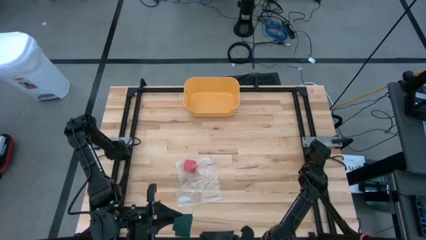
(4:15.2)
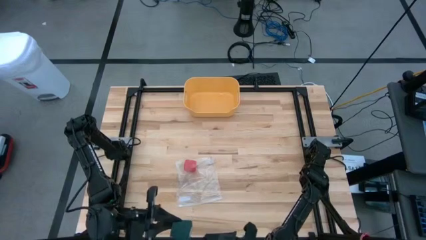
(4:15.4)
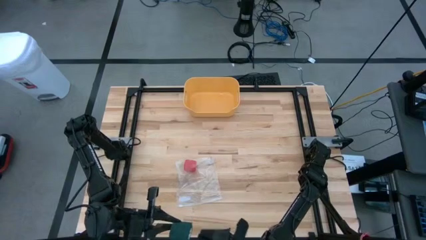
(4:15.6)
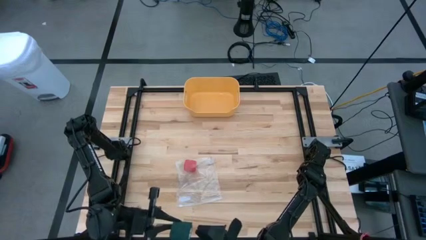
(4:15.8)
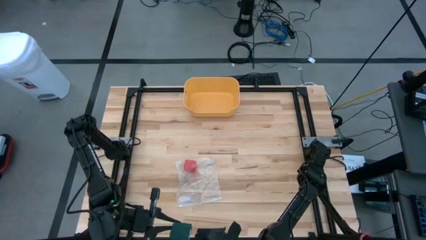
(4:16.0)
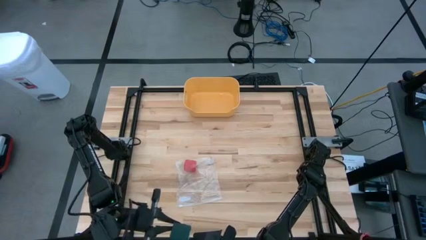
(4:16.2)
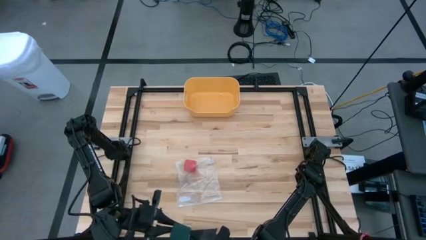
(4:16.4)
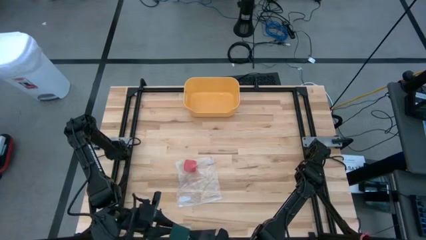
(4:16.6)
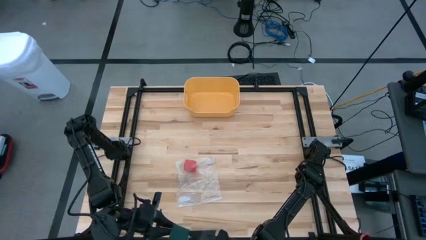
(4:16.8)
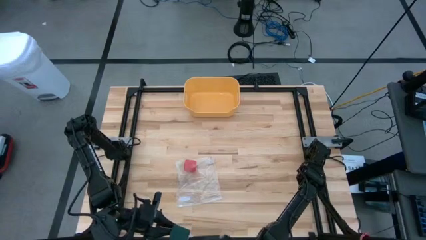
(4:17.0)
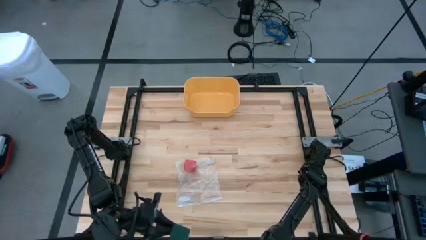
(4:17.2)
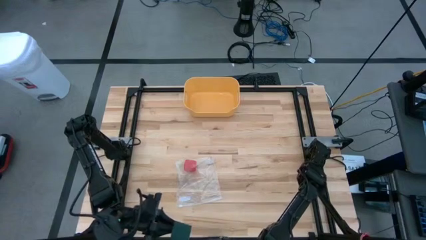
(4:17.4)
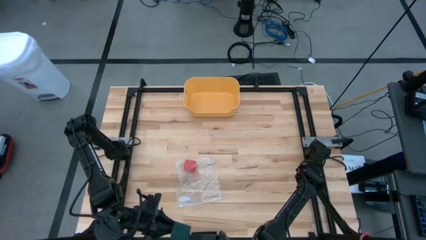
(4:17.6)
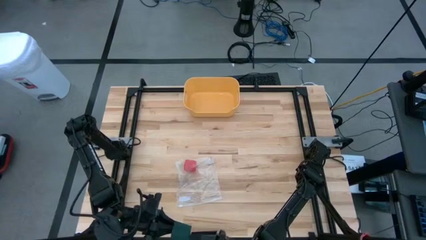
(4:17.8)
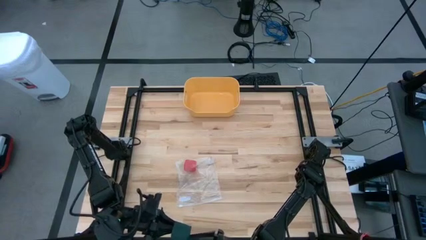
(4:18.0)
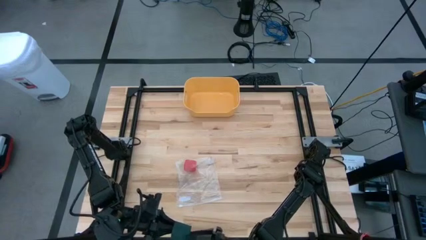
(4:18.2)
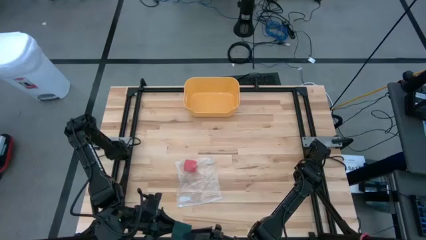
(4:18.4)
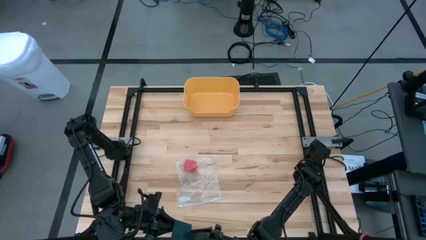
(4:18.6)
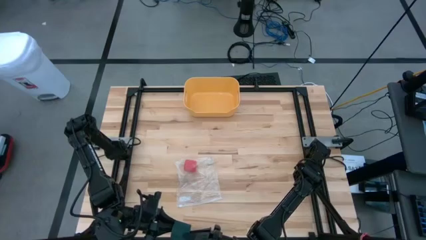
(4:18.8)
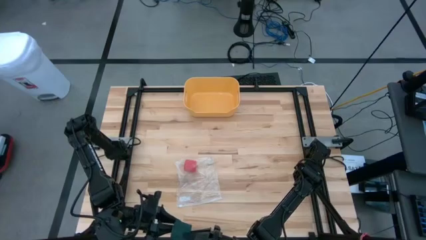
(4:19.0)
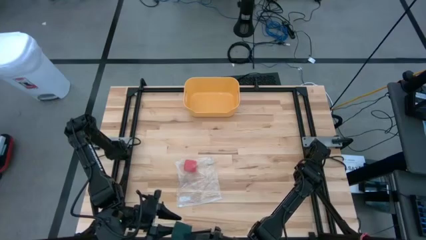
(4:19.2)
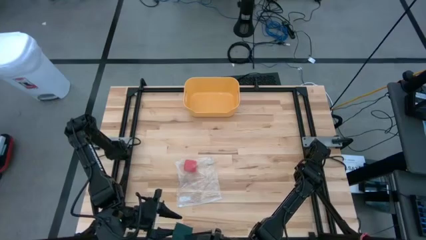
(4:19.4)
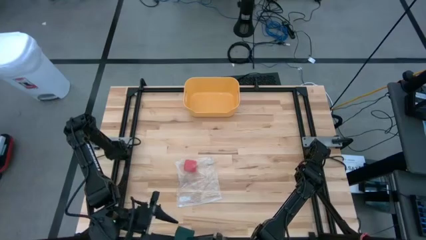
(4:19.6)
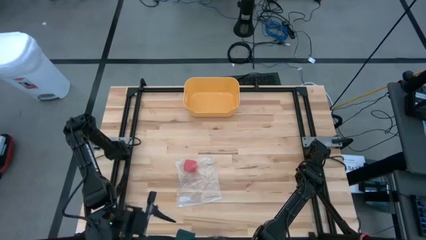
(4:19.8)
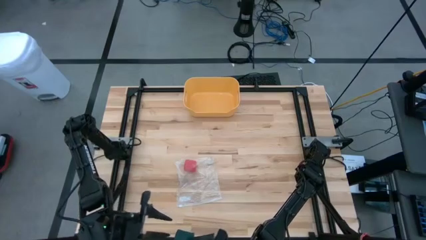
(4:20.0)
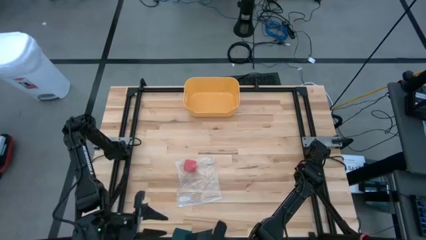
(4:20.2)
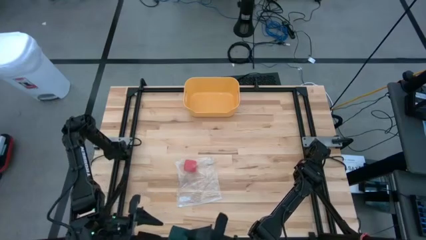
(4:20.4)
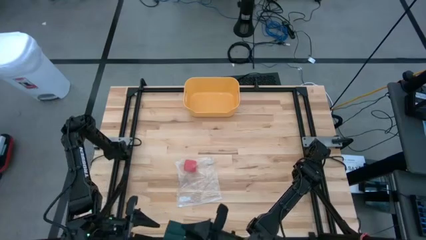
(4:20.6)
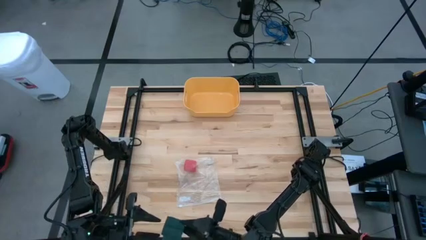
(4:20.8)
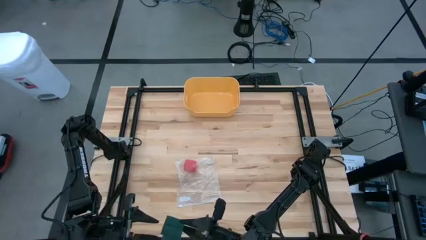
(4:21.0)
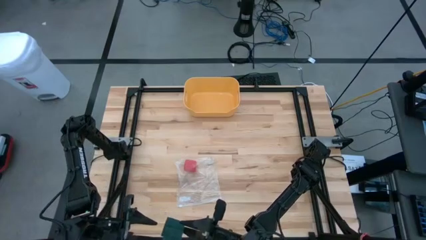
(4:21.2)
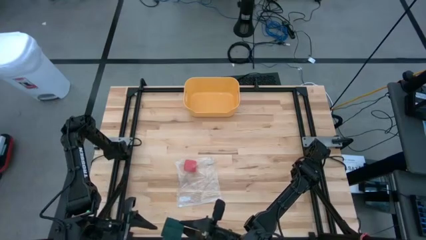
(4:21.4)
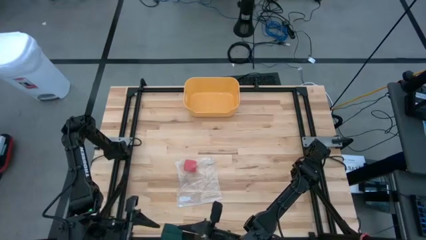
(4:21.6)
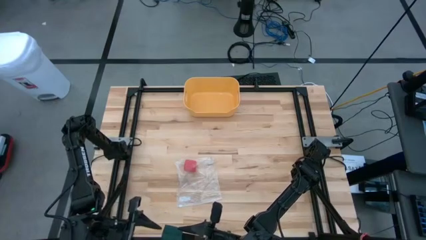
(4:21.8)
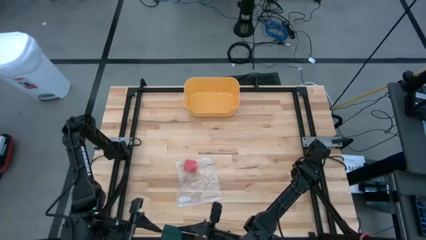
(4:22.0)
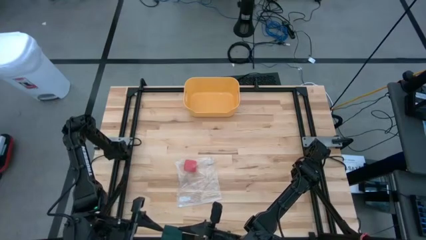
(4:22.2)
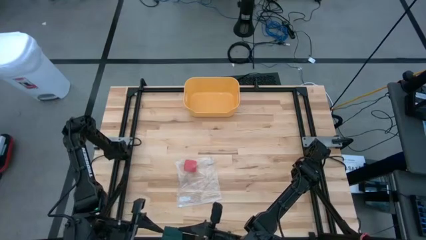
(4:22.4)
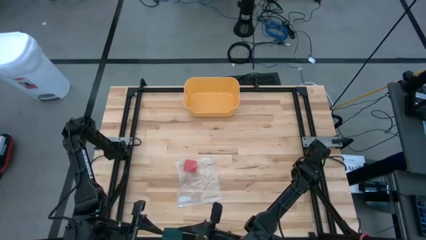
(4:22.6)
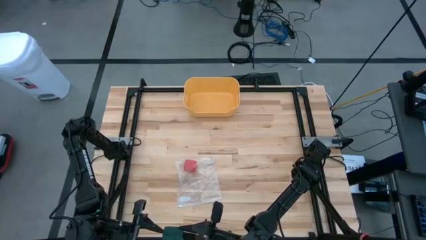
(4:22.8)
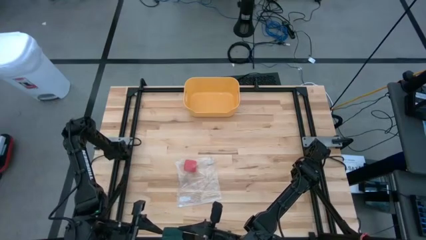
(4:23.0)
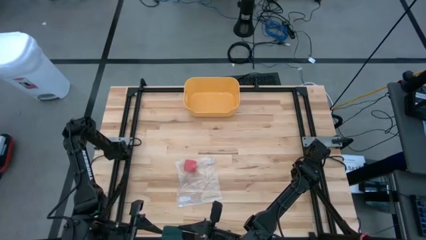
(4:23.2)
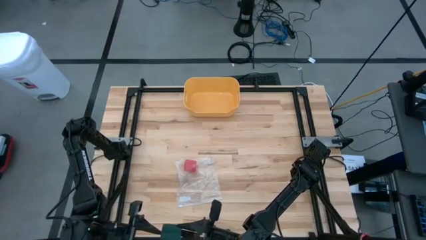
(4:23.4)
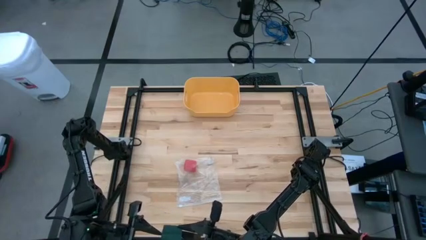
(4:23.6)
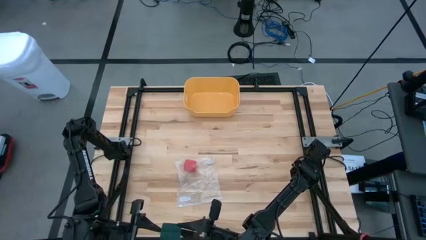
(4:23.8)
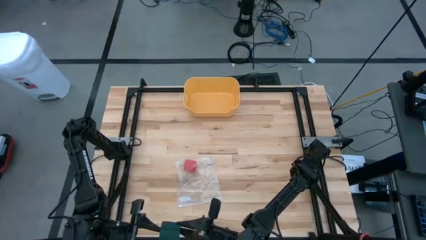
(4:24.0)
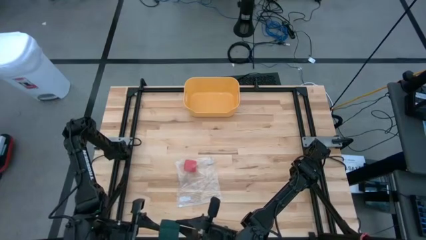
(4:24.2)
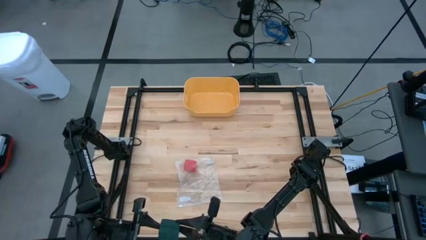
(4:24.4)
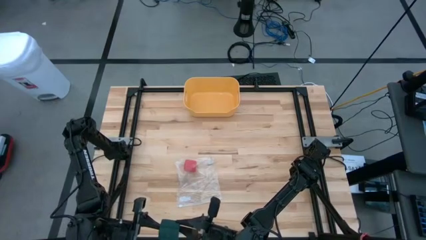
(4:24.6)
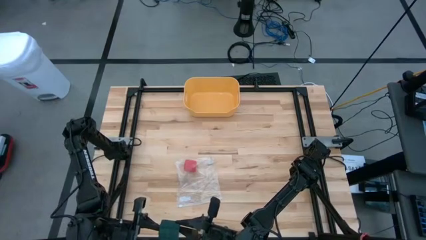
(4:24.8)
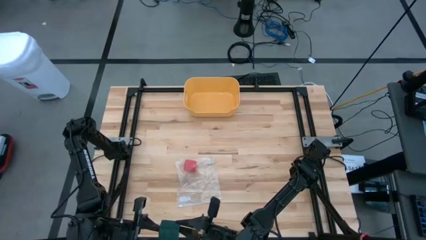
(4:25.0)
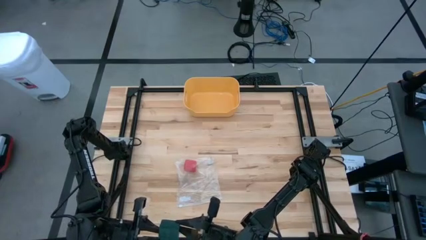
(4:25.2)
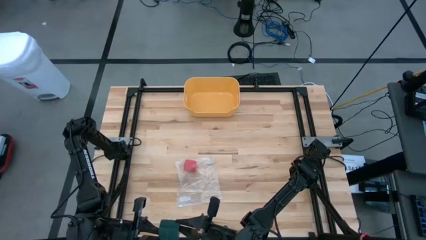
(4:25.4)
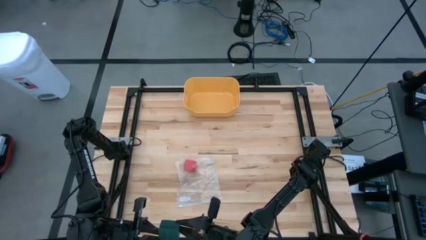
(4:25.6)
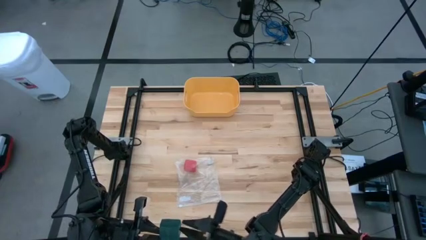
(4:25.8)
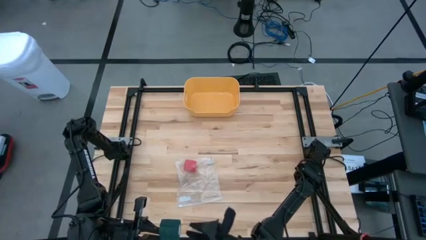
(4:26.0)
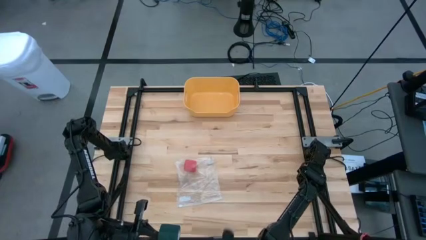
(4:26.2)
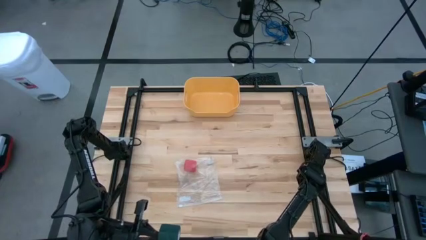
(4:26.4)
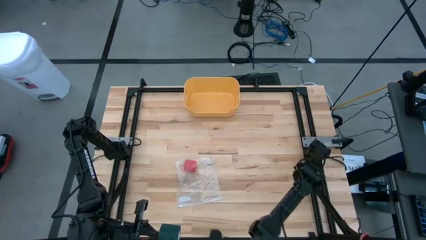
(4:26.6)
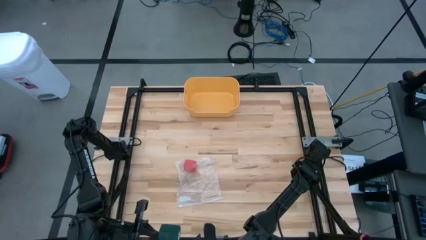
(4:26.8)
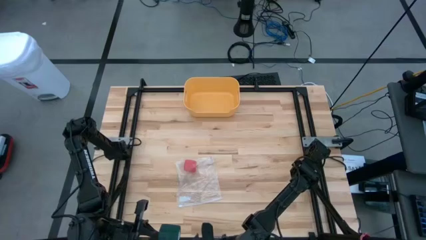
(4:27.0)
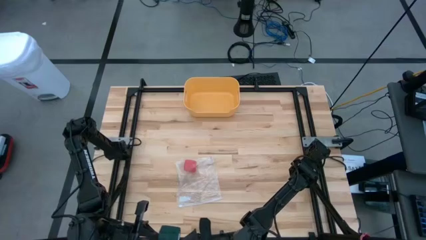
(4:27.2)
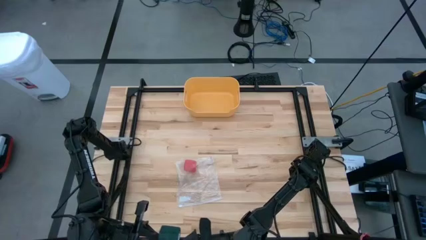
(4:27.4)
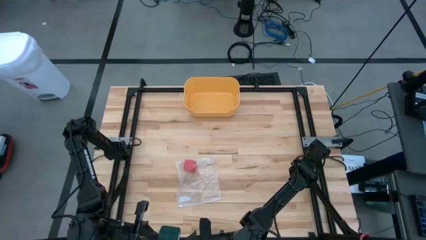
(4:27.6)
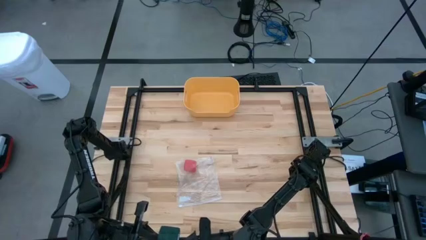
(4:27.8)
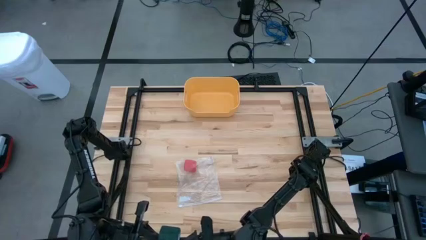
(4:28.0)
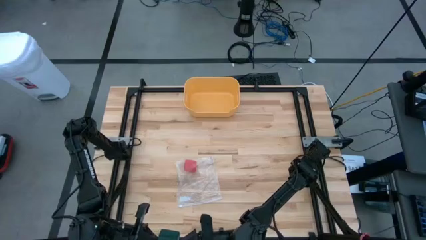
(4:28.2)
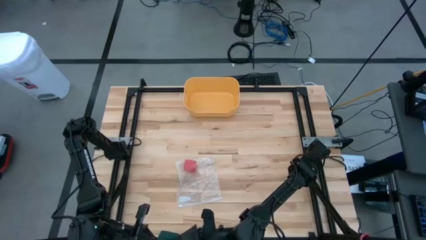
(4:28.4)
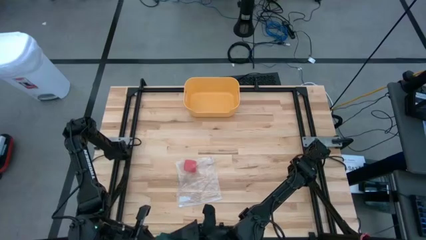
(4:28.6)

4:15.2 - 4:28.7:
Task: Roll bandage
Roll the green bandage

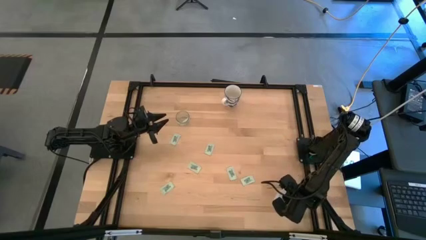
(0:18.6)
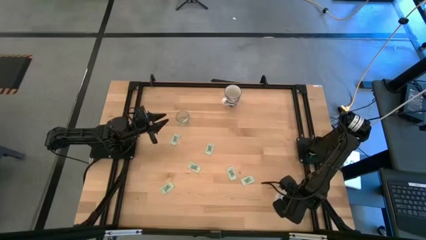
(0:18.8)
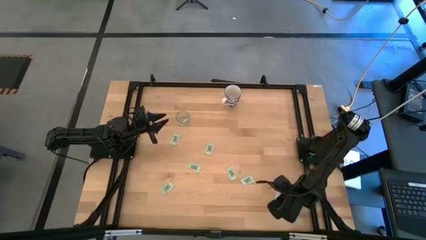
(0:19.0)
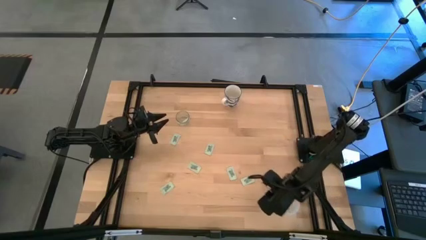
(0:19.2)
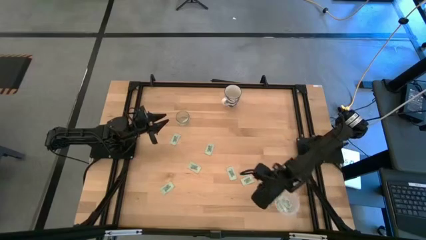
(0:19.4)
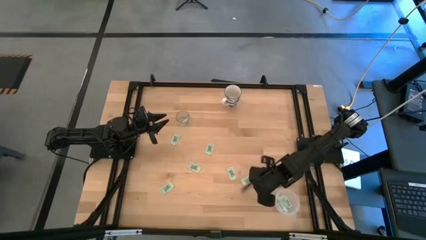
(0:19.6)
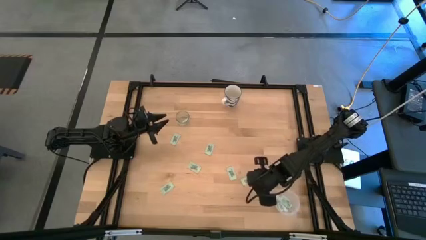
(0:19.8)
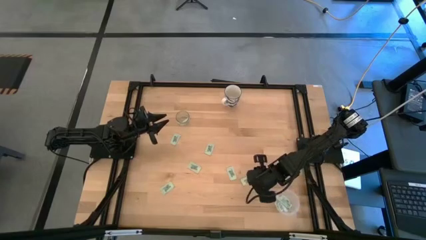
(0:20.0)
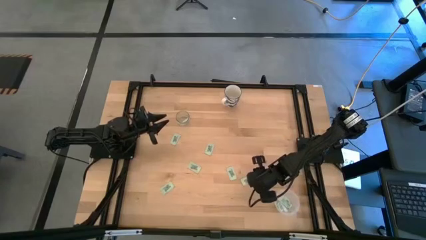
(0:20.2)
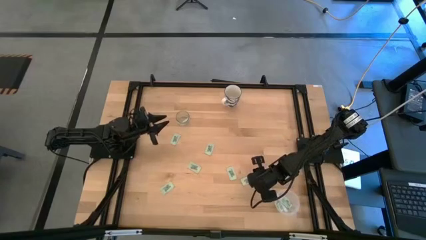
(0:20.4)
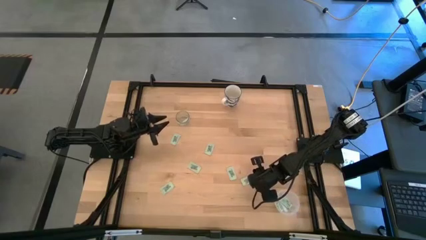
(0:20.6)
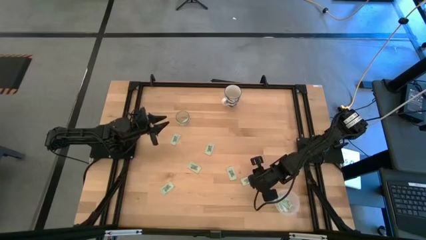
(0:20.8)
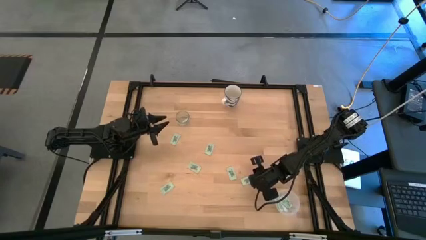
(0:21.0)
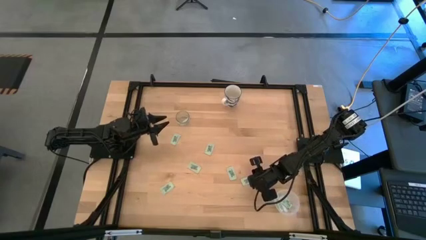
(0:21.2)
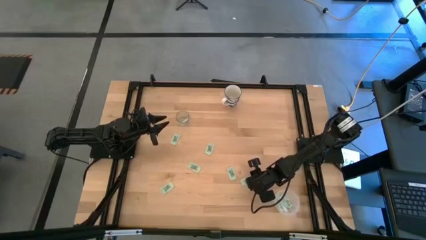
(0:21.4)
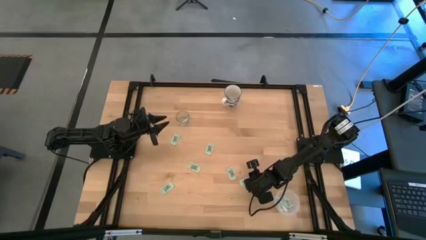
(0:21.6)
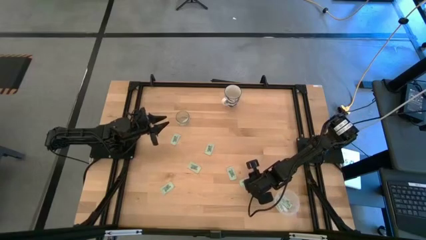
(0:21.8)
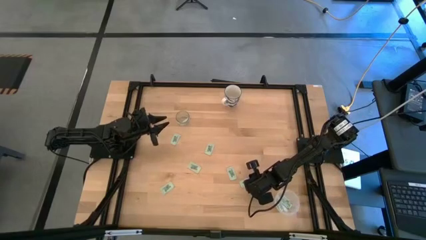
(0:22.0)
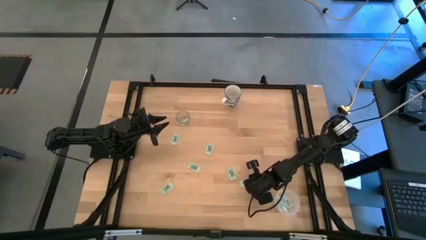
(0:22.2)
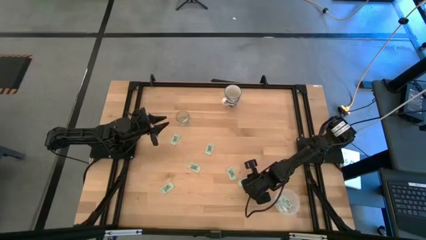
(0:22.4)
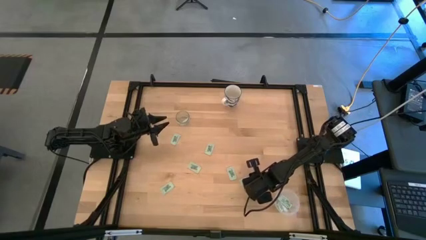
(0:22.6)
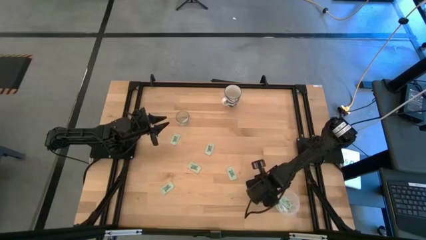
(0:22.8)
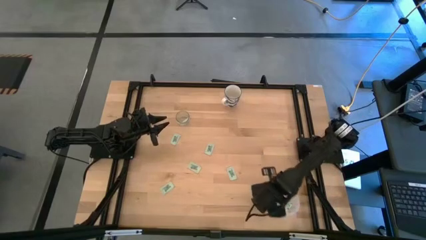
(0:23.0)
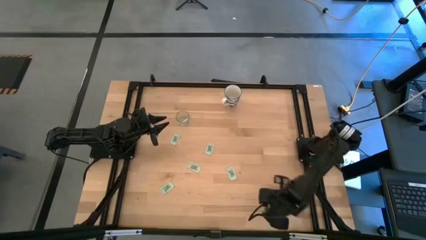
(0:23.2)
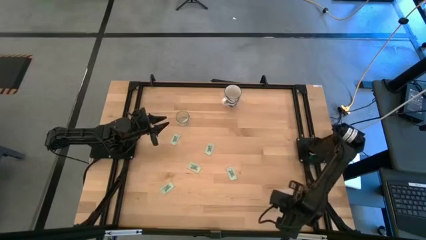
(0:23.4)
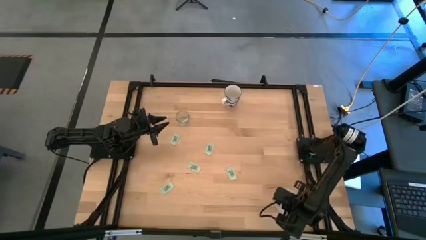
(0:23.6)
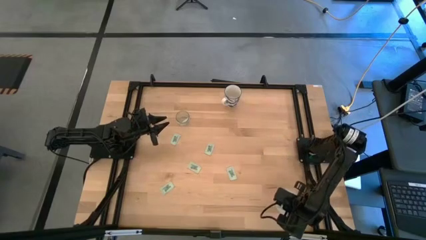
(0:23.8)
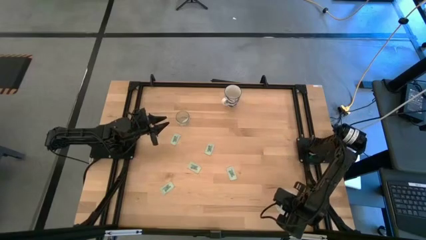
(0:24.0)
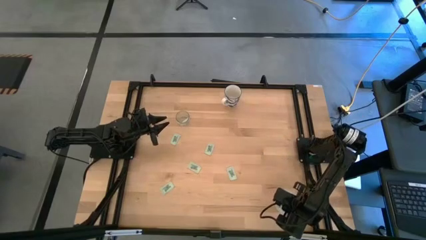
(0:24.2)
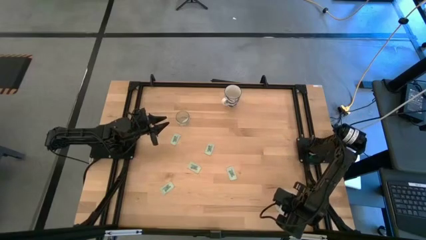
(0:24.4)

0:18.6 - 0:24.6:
Task: Pick and place Stevia / Truvia into bins
Put the green stevia packet into the transparent container
